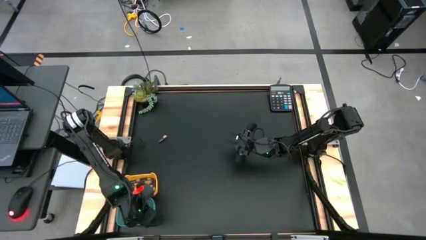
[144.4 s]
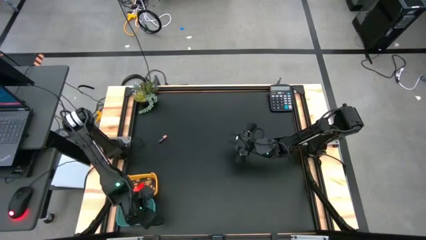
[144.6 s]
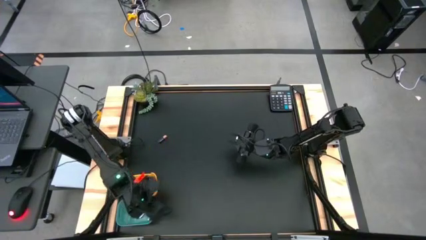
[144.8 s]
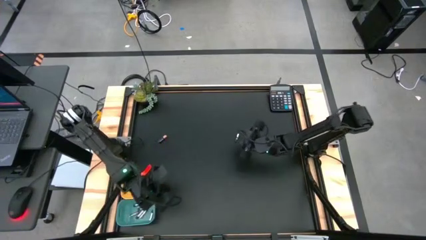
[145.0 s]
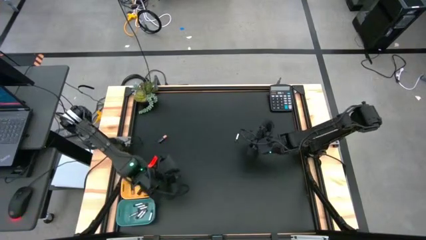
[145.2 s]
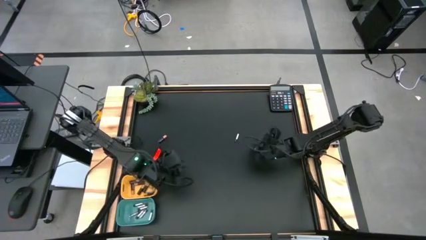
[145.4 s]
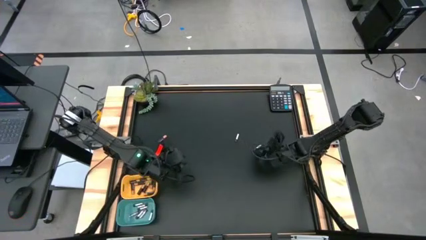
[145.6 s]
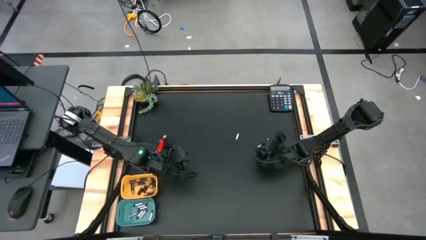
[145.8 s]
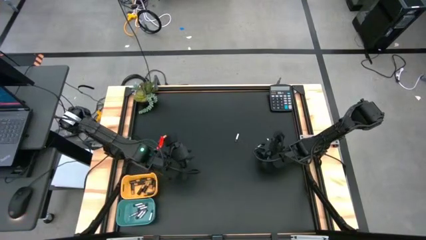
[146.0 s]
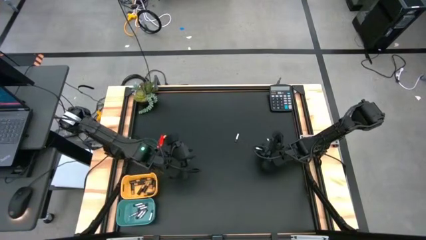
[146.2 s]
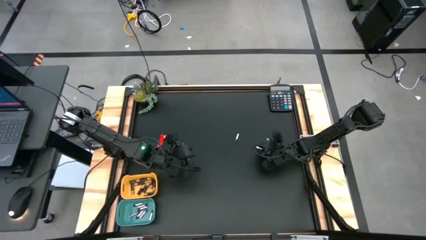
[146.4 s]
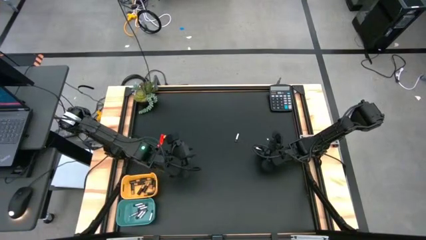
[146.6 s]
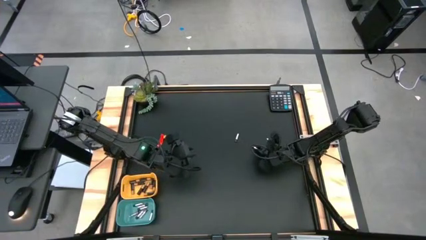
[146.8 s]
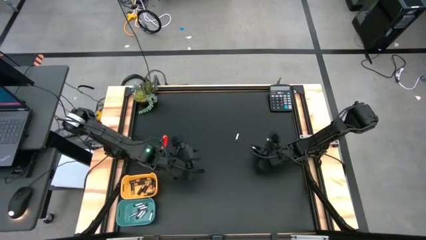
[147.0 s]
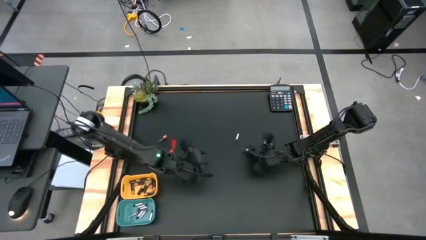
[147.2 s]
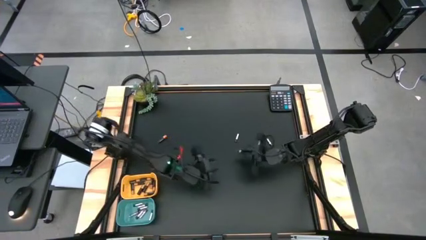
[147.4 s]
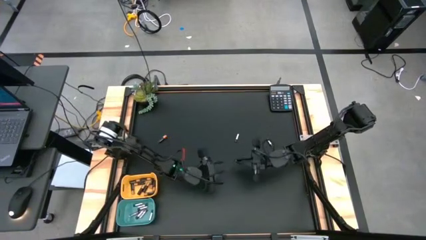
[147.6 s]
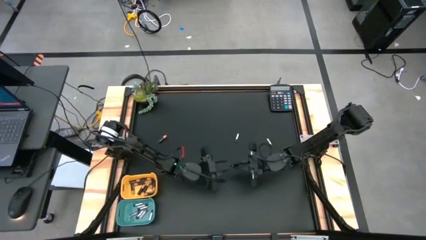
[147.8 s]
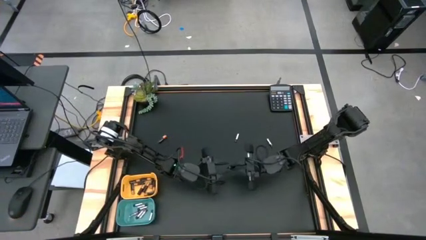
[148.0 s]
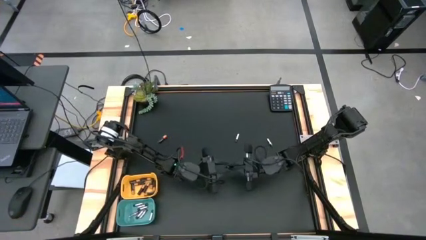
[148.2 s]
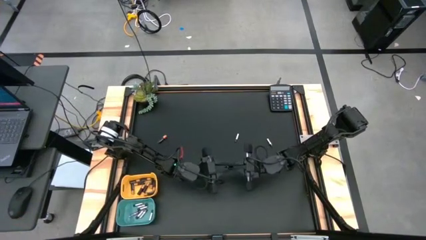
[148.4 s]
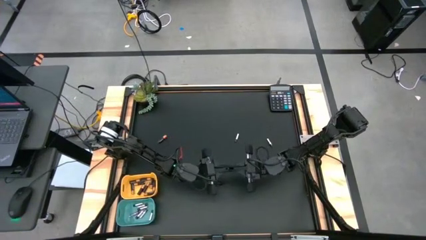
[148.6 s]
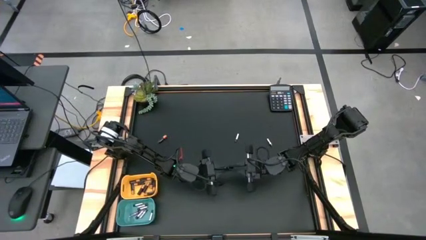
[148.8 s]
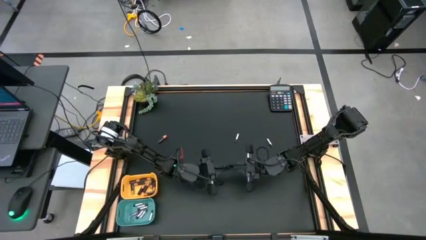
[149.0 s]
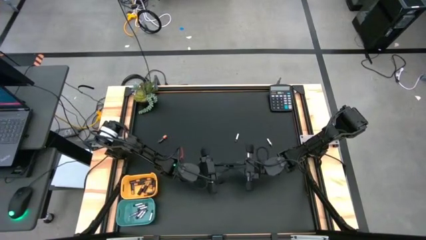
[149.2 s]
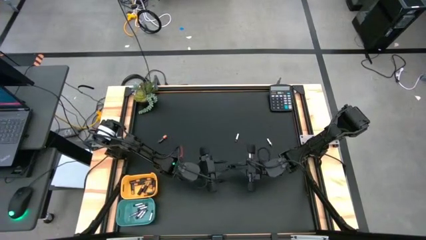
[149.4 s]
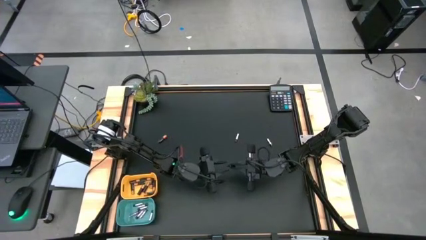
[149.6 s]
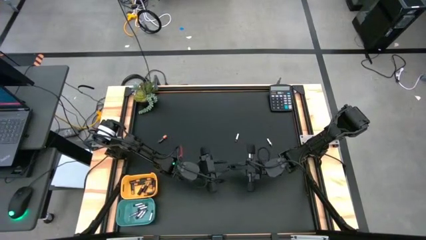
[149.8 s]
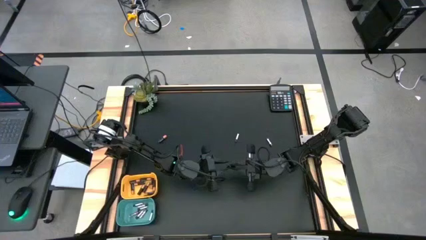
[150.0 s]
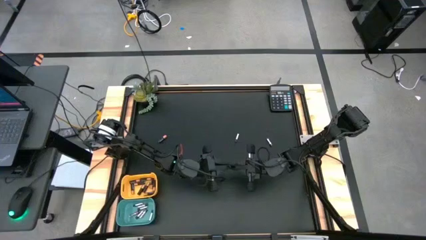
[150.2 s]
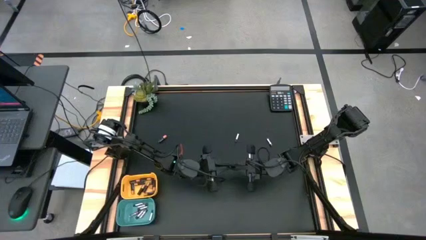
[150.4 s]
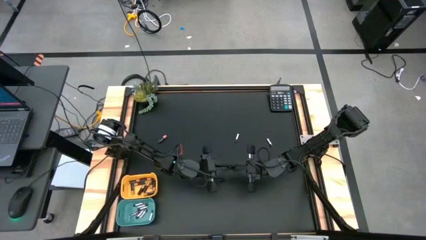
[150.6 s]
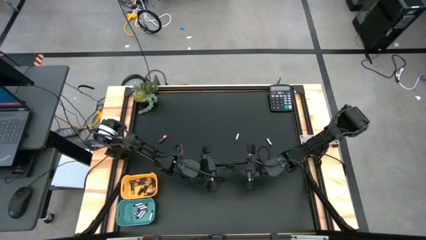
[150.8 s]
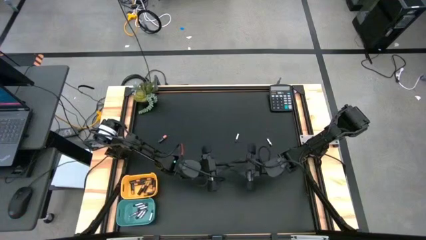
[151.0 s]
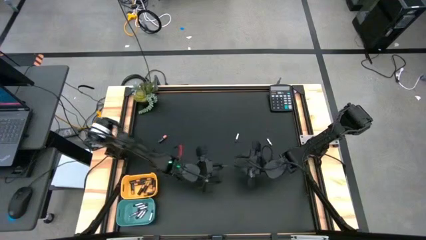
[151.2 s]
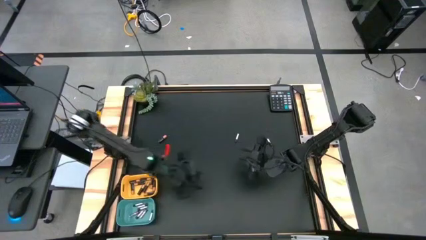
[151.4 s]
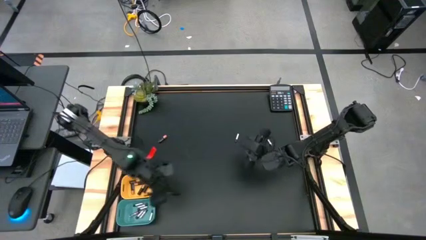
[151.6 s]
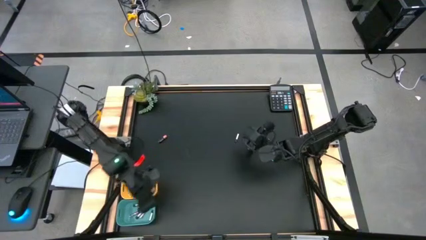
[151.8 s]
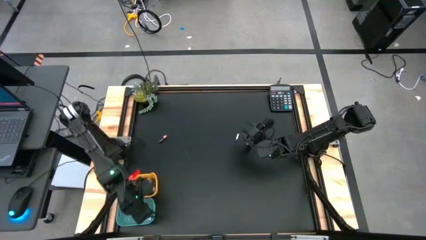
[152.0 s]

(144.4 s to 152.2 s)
Task: Sort batteries
Put the middle silver battery into the green bin

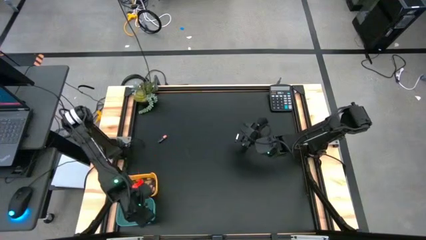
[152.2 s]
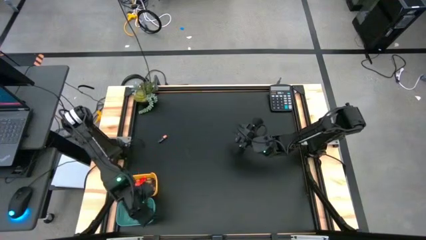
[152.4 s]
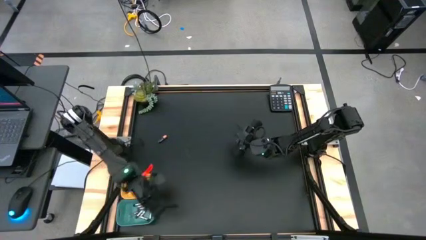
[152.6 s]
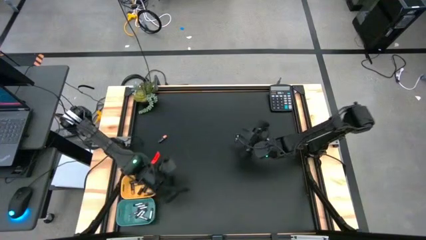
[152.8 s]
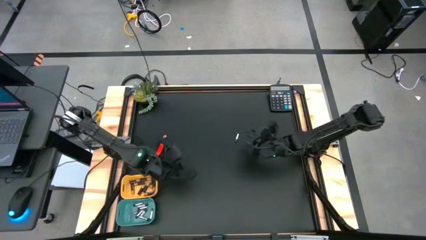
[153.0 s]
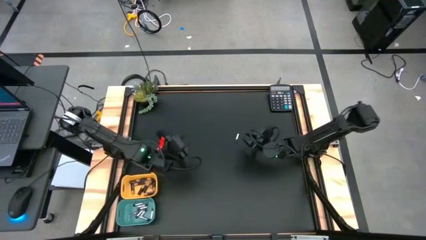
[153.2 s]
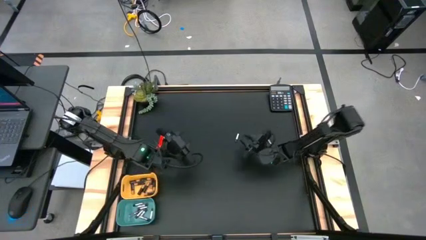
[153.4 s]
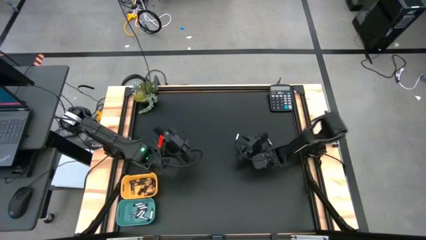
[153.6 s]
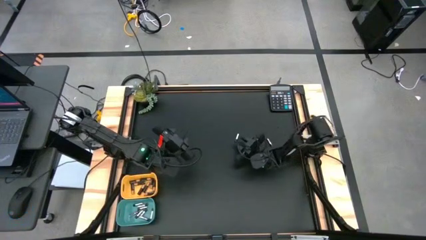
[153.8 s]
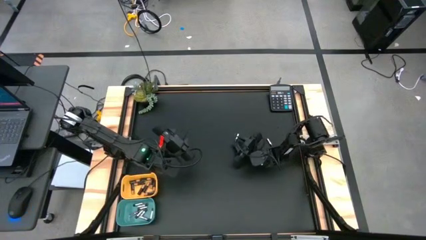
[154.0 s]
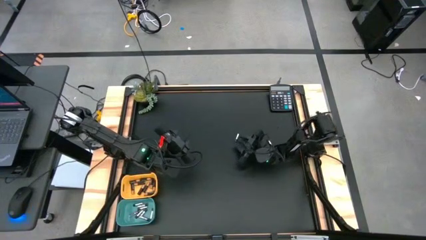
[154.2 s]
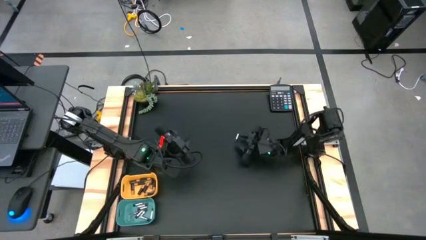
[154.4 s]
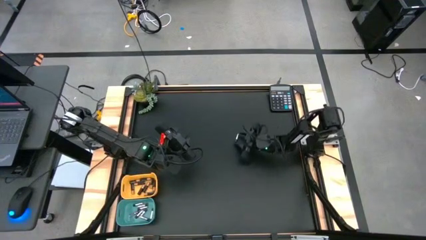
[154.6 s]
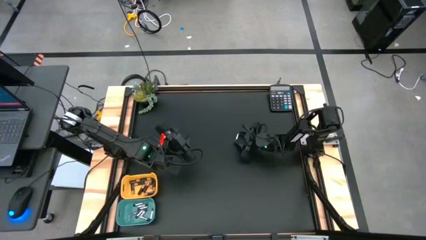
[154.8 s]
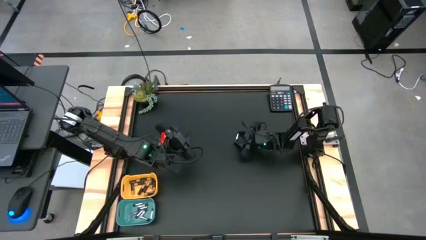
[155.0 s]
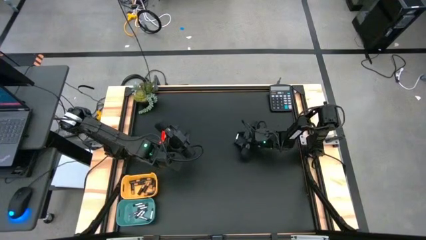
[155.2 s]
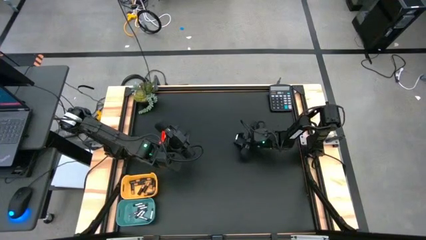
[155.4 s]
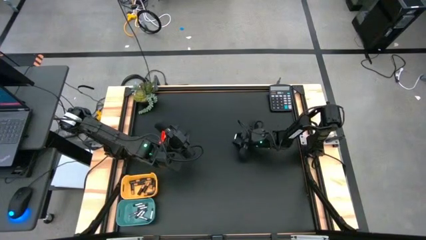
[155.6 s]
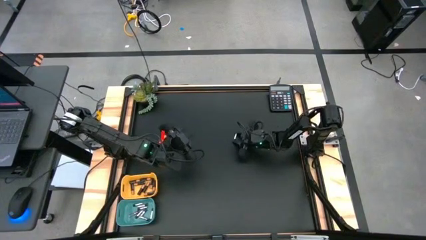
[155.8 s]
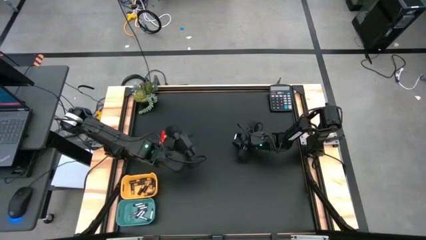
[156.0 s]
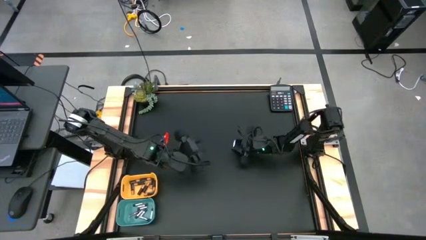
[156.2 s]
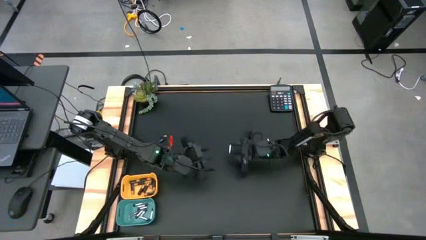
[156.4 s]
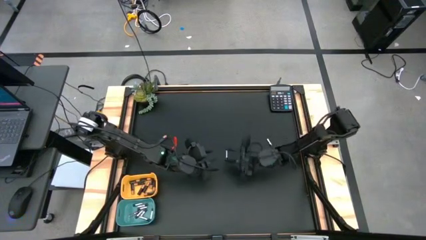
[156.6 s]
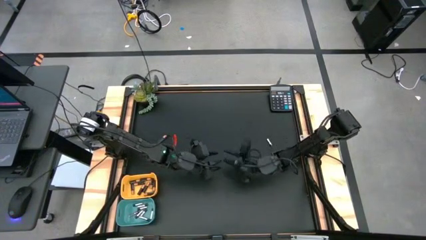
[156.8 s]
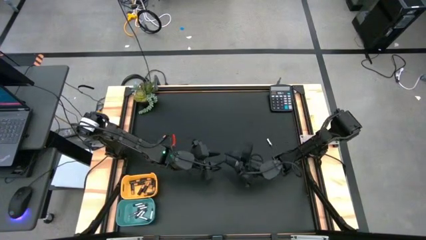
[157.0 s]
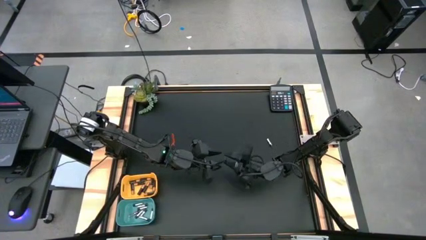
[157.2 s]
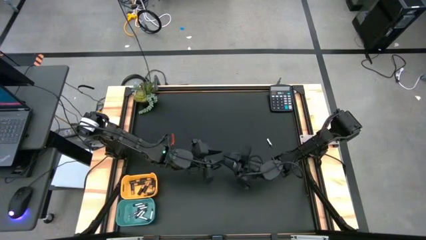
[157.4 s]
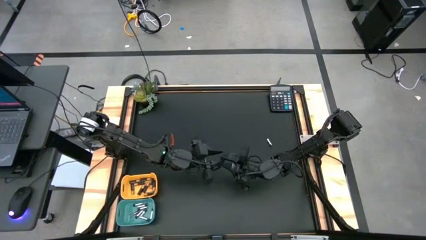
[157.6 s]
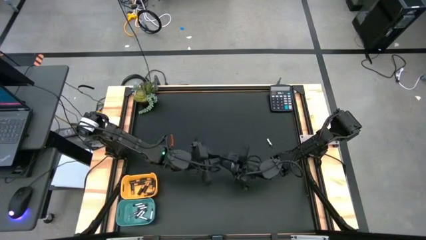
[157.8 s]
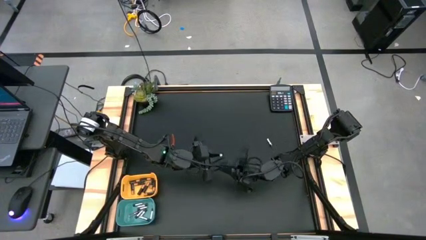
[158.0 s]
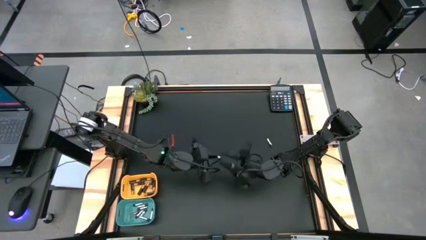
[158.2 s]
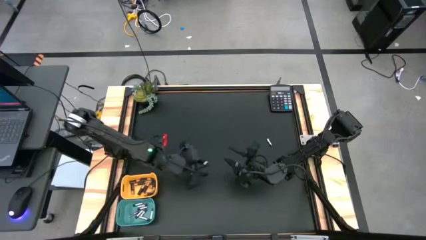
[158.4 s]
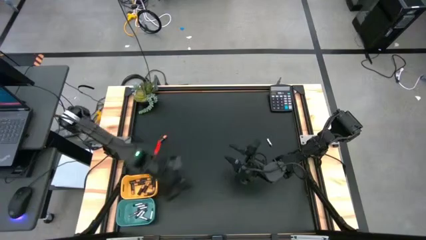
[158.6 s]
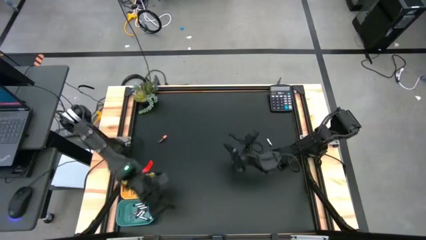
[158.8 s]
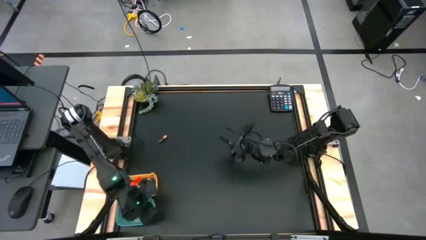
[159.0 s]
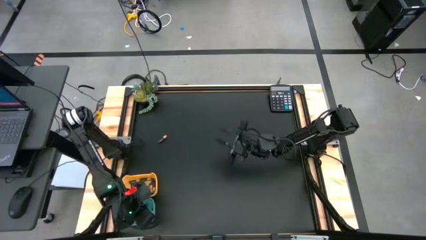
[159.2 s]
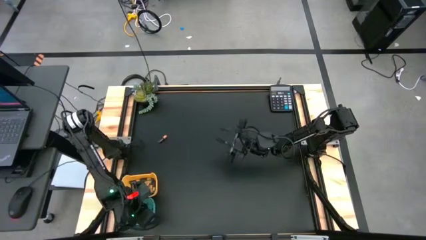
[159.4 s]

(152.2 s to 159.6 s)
Put the left silver battery into the green bin

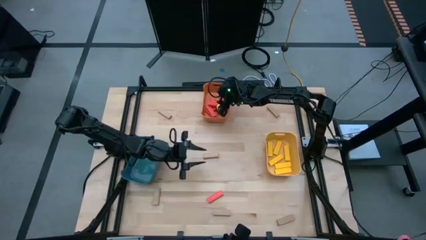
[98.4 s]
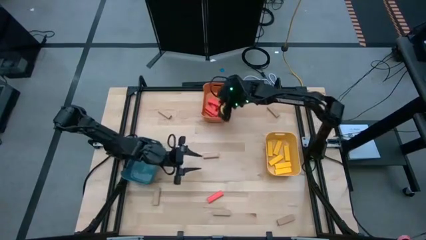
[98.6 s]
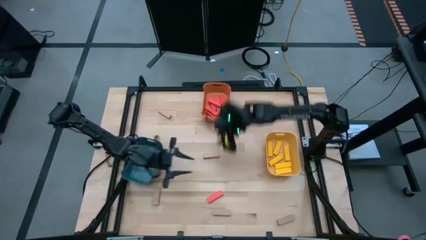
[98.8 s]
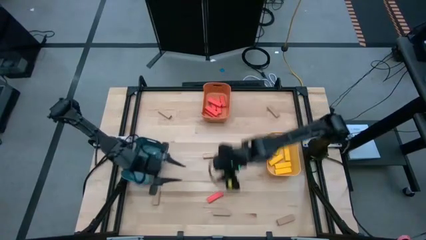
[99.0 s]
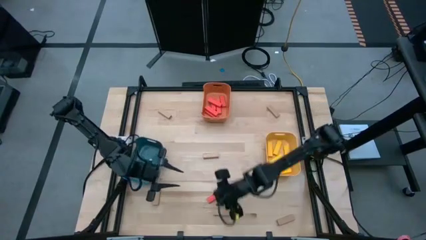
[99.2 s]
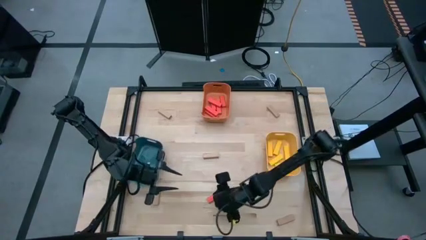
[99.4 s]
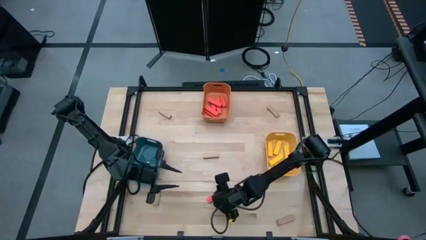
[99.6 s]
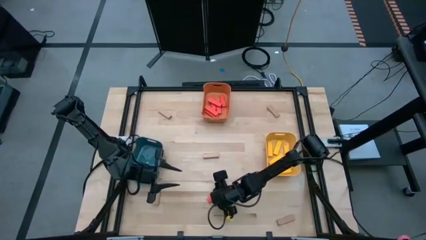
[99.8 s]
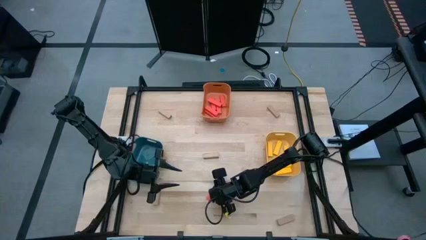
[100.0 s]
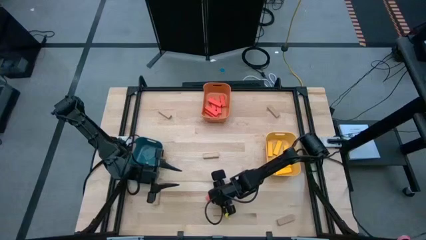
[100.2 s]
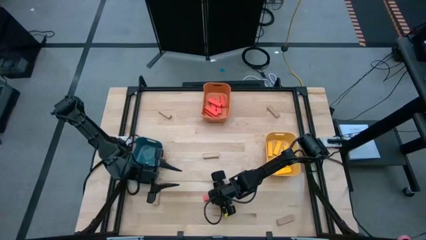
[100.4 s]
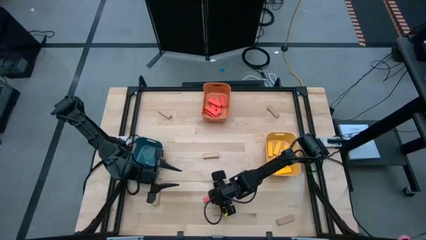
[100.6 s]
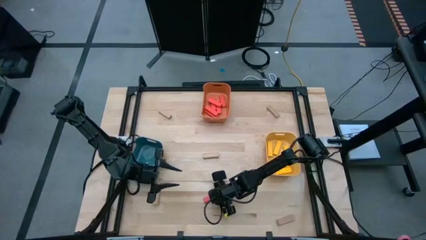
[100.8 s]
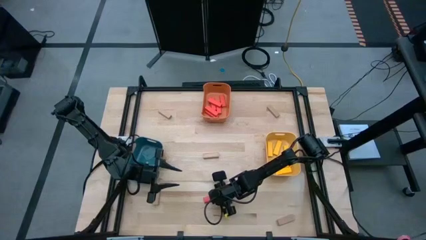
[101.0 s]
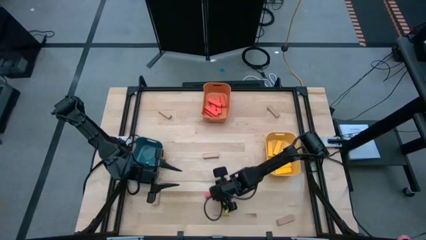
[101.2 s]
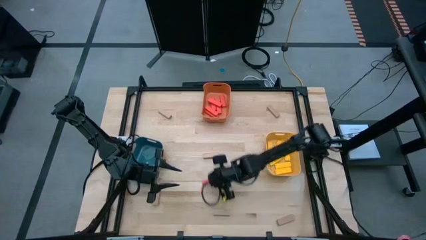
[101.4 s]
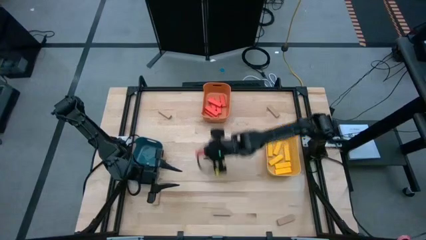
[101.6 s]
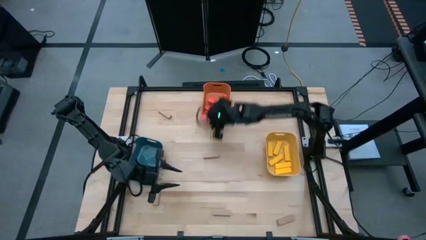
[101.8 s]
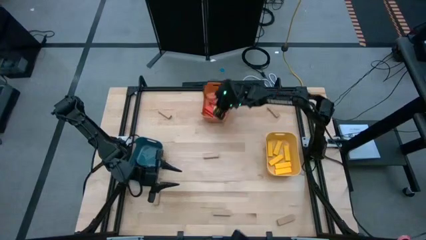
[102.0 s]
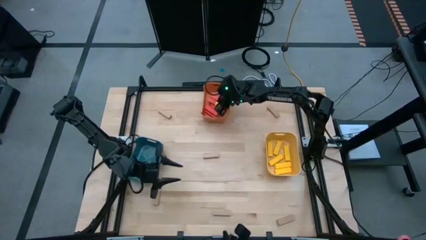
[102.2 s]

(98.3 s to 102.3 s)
Task: Sort blocks
Put the orange block into the orange bin
